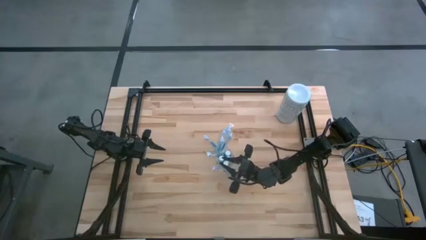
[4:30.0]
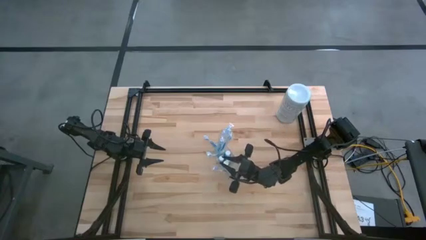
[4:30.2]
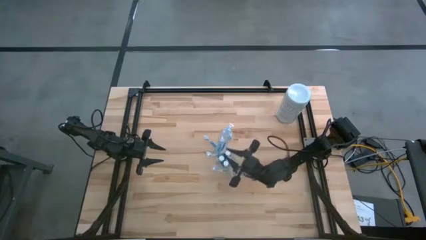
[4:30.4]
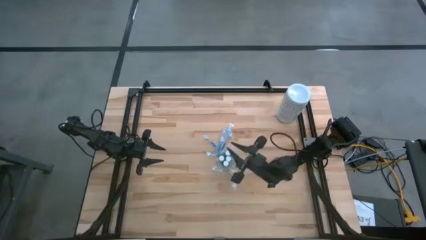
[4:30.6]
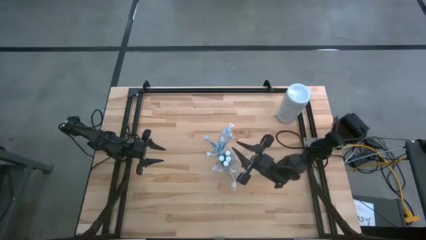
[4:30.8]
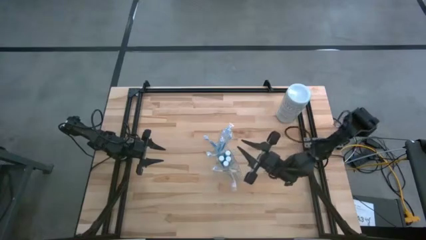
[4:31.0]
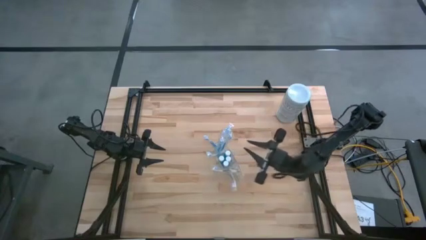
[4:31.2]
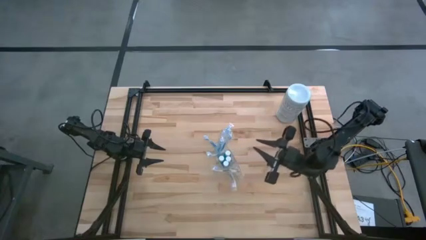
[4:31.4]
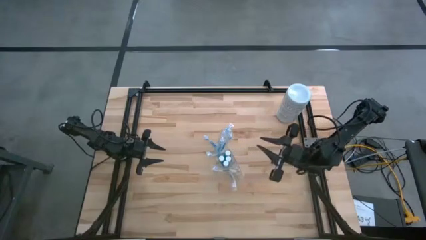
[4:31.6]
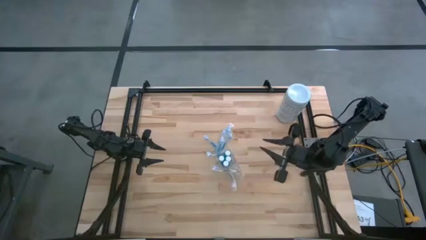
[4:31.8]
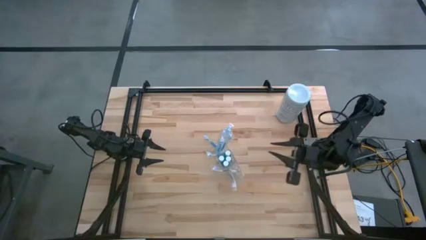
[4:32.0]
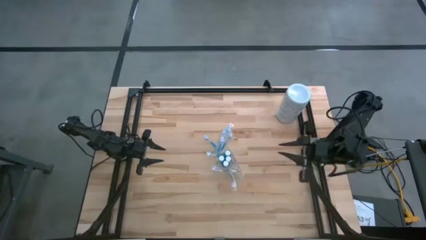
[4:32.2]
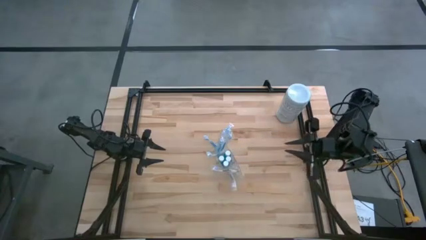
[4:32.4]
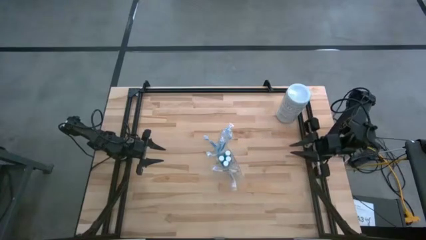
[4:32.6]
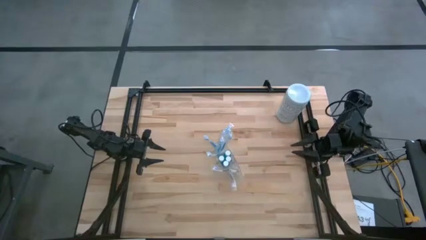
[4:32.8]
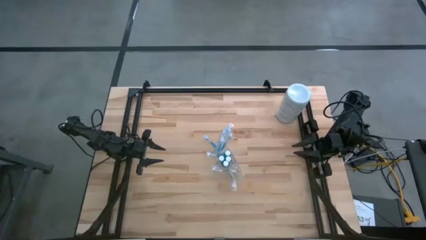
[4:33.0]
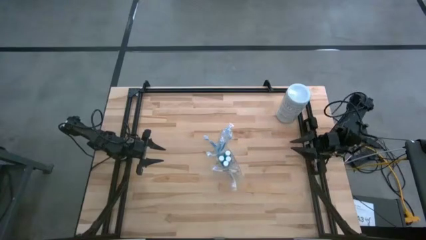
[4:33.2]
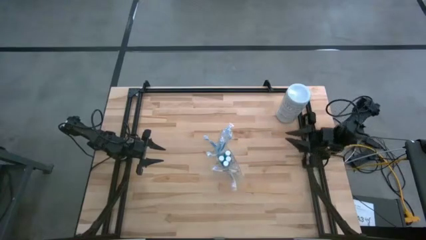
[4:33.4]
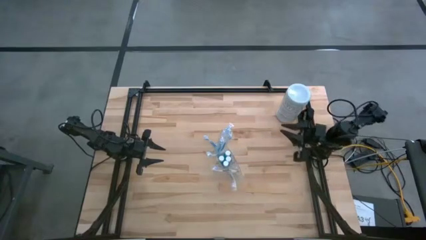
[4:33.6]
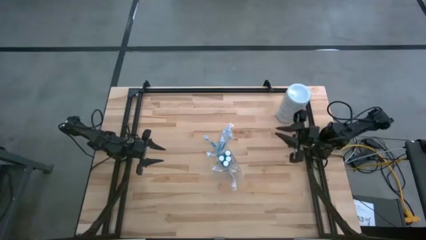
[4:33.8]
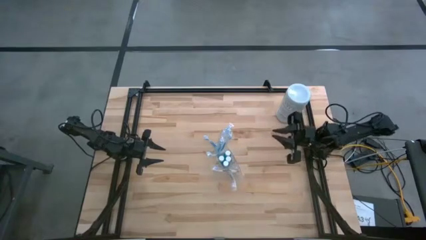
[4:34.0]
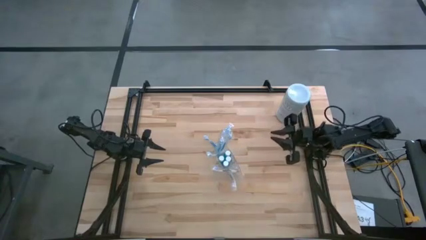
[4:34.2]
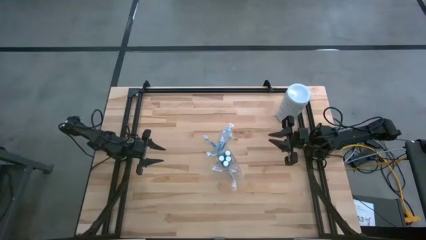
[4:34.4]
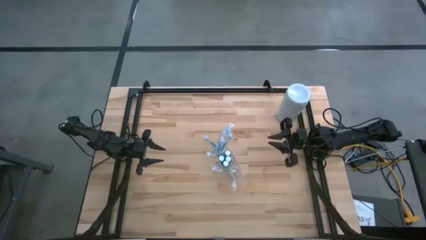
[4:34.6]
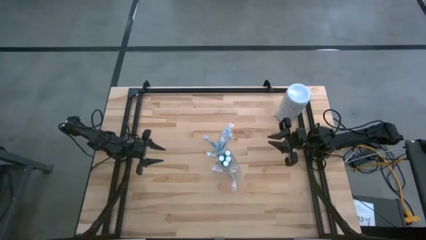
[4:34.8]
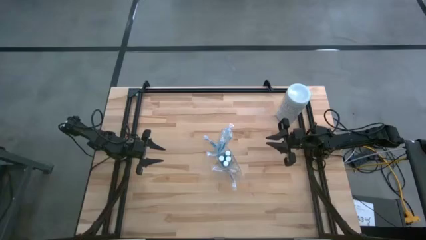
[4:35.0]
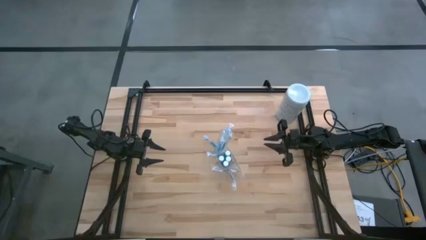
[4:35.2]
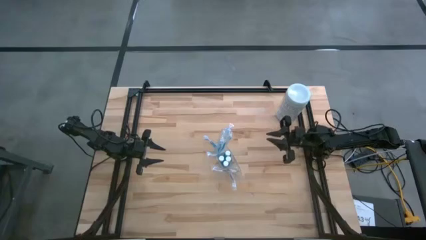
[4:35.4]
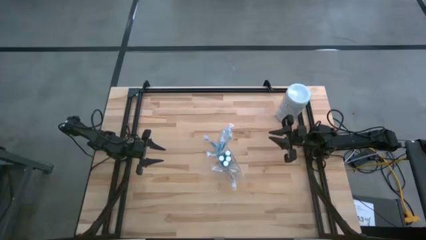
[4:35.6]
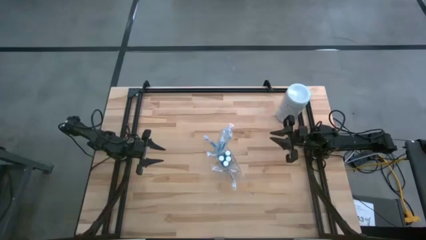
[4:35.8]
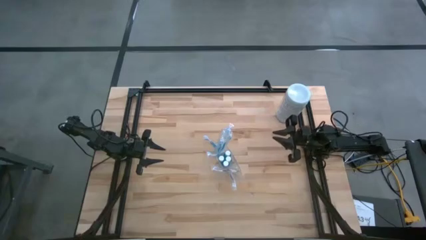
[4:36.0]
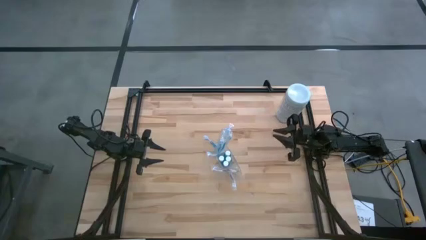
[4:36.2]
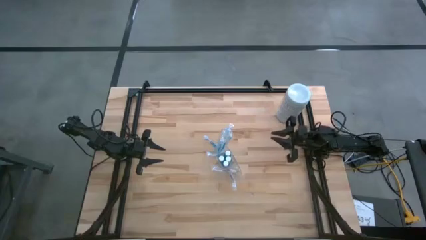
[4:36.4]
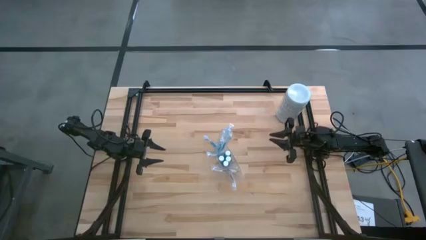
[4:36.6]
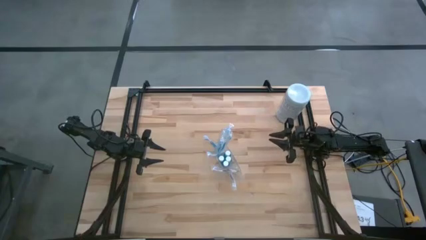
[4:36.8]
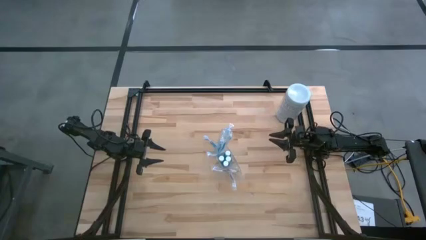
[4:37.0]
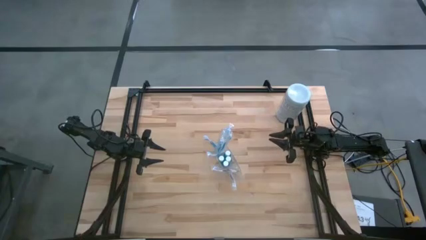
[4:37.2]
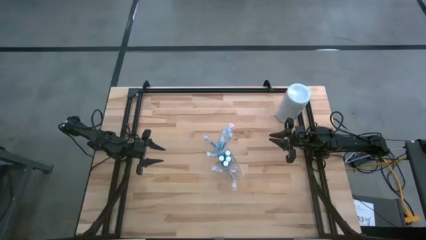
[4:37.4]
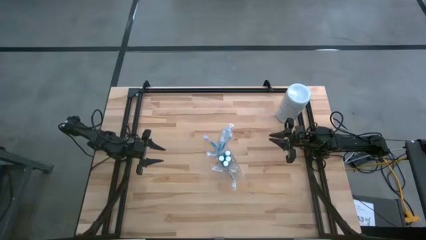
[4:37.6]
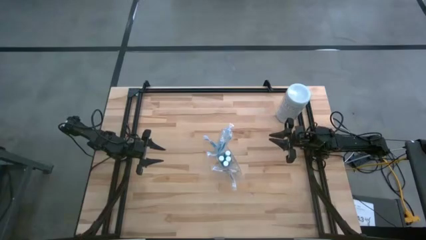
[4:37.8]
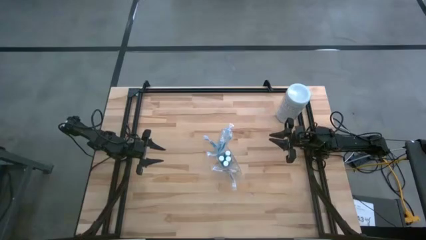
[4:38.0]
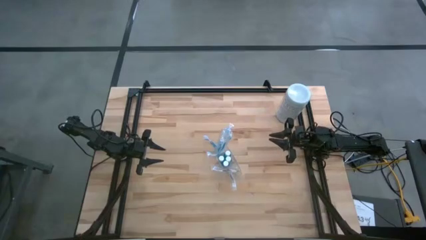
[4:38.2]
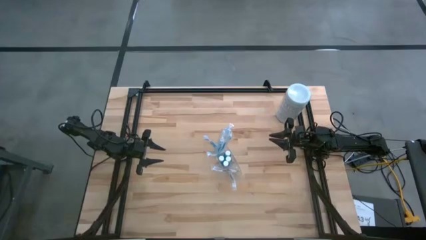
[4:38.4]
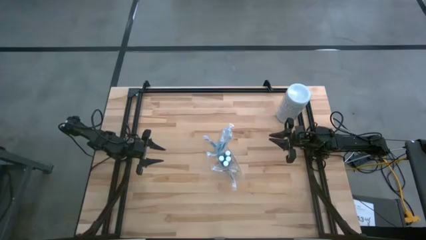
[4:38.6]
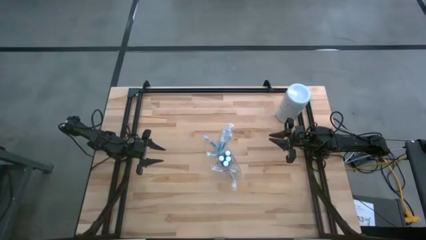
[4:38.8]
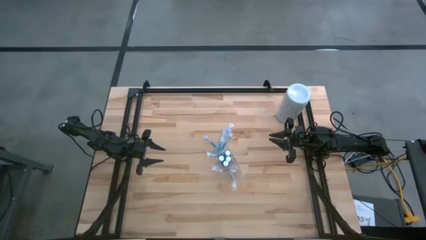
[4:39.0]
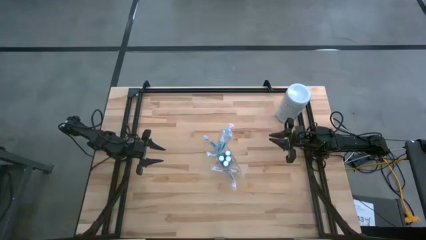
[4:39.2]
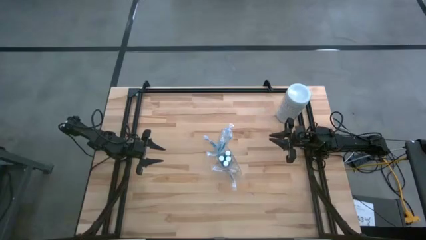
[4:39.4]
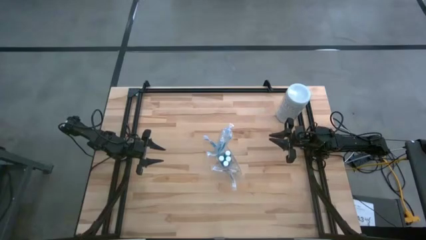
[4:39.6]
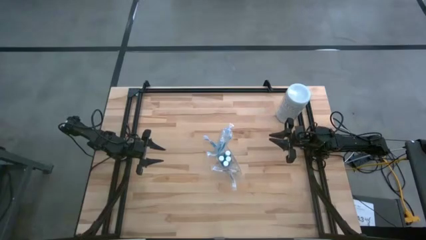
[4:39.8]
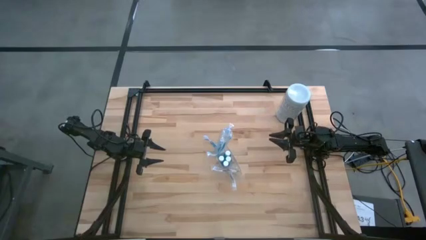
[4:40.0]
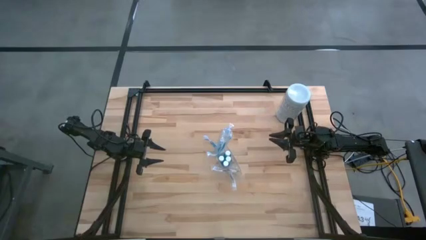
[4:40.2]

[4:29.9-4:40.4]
Task: Pick & Place toothbrushing station
Return to Home Position
